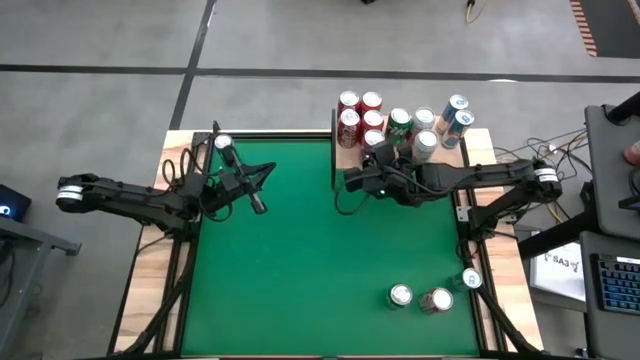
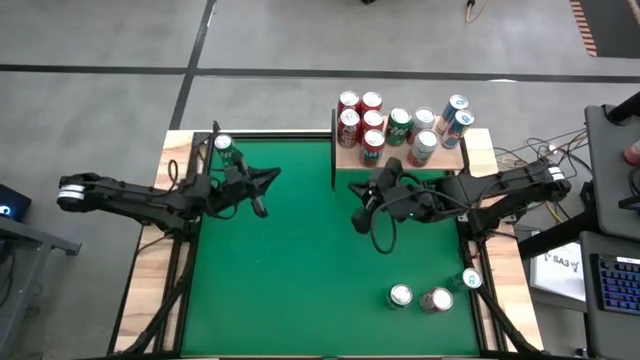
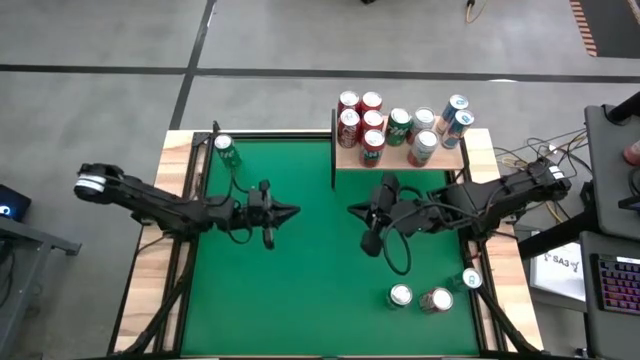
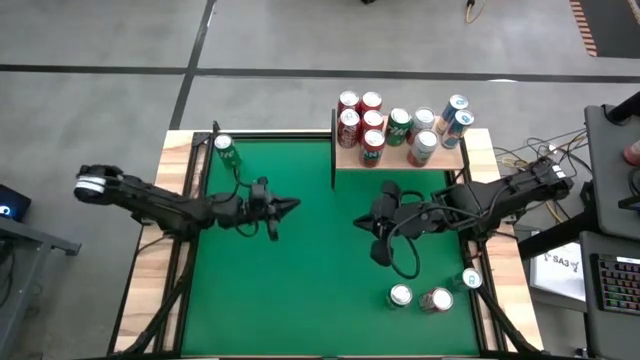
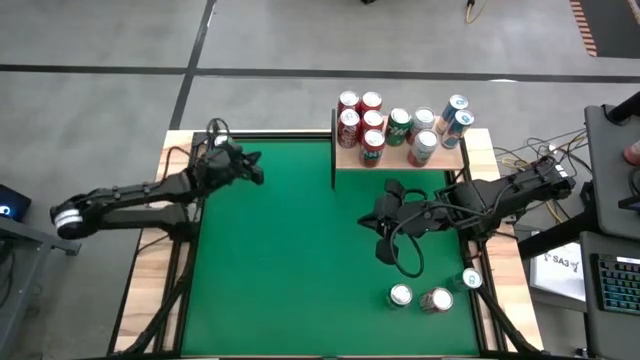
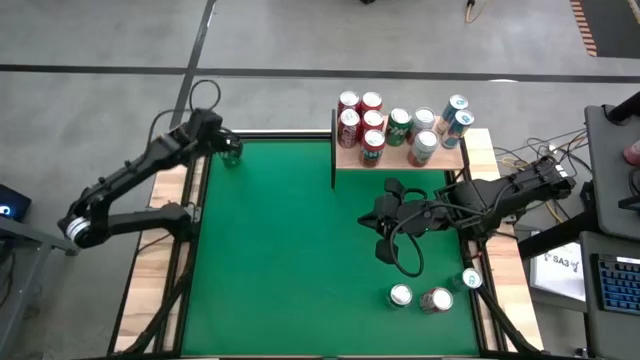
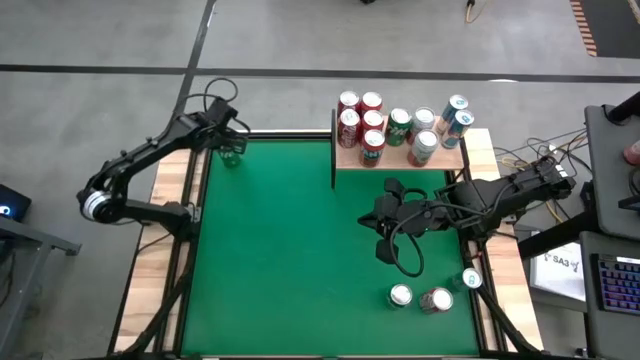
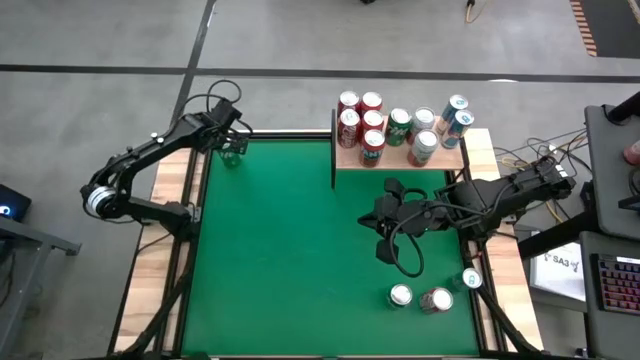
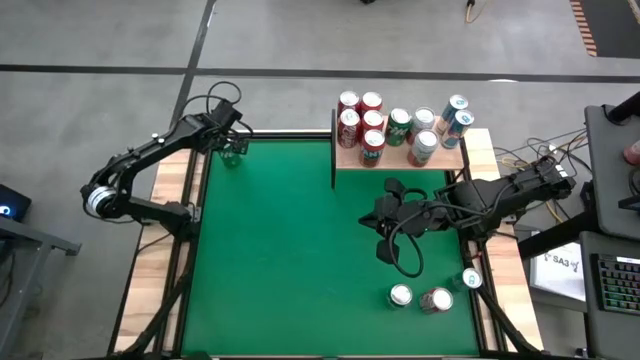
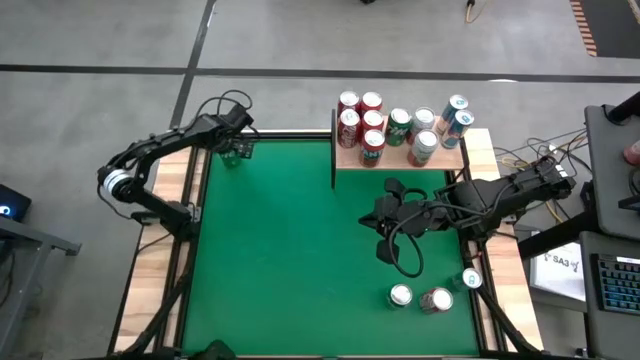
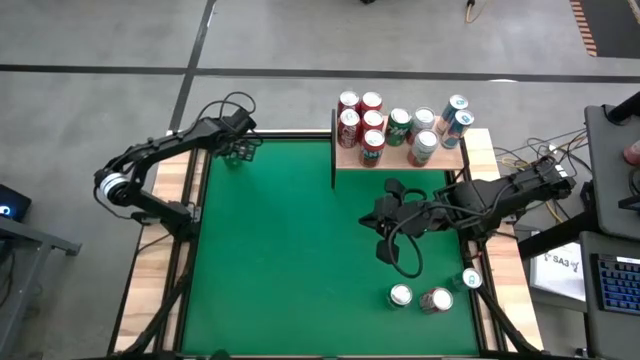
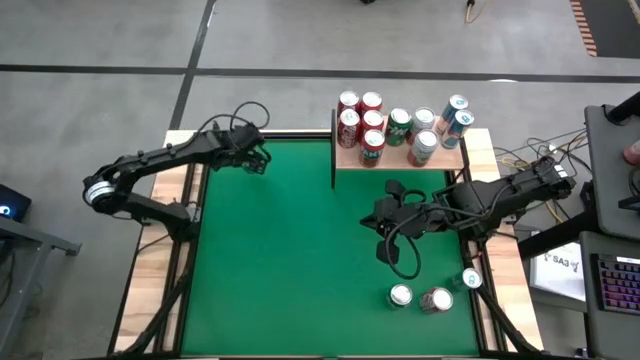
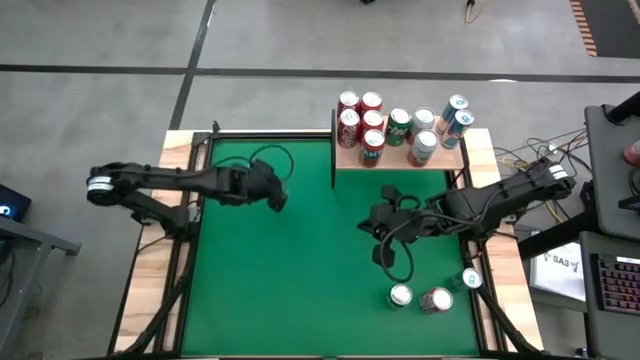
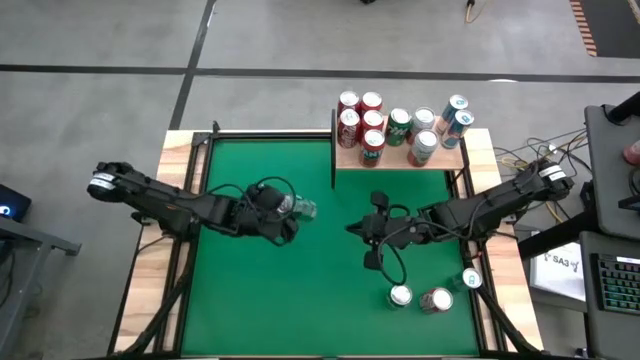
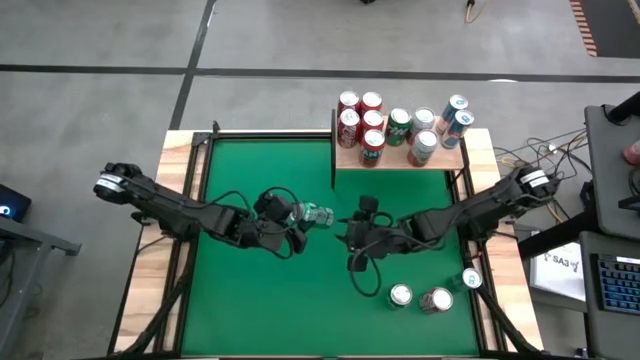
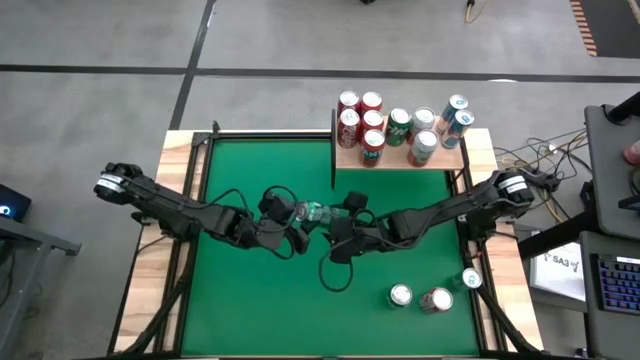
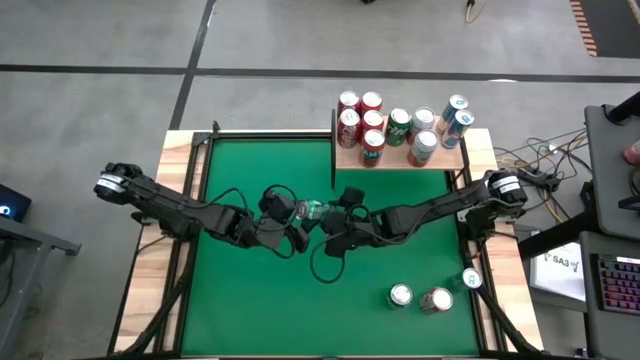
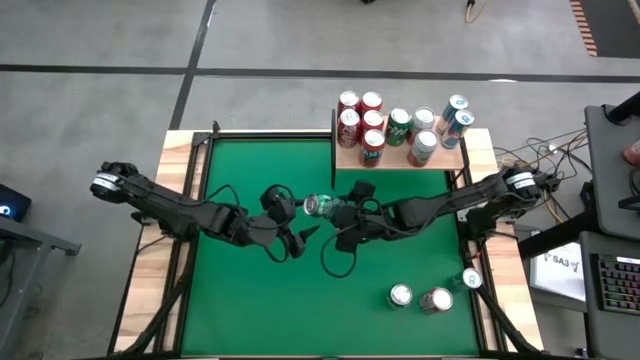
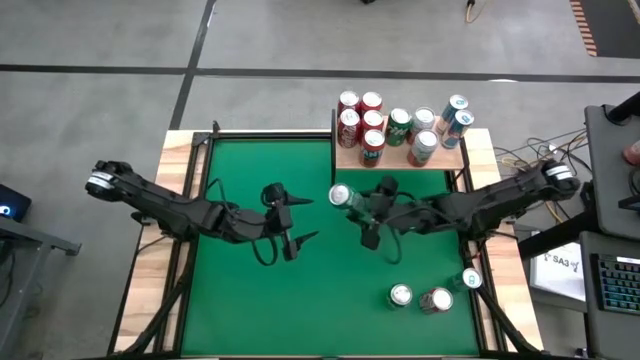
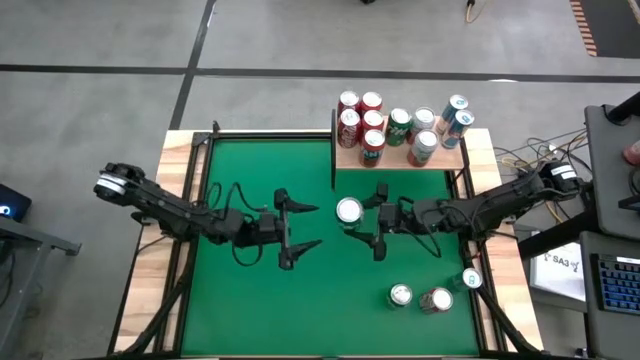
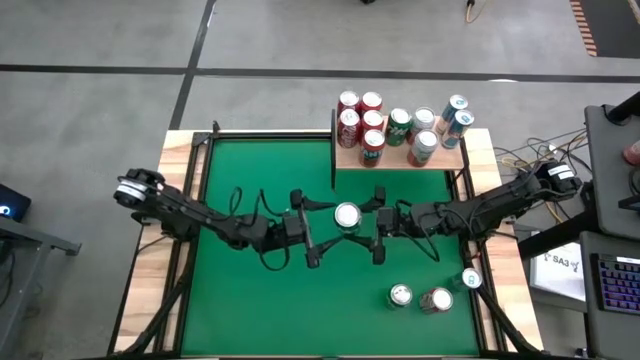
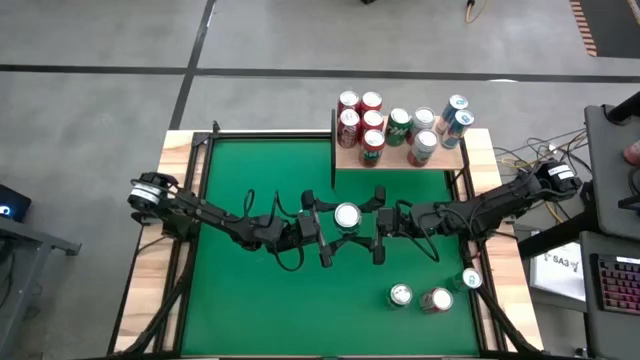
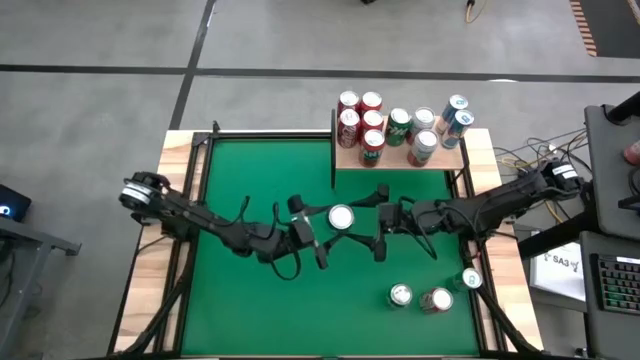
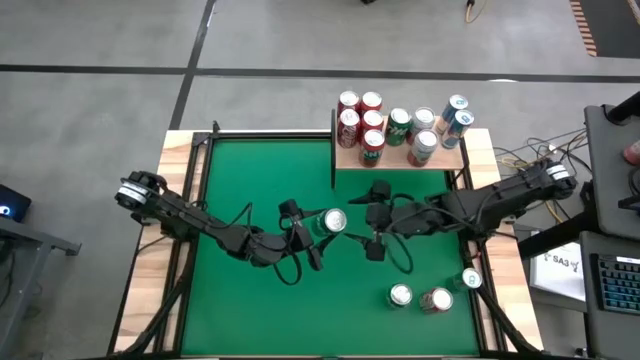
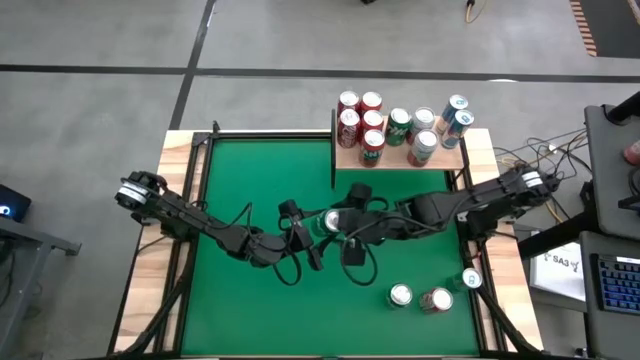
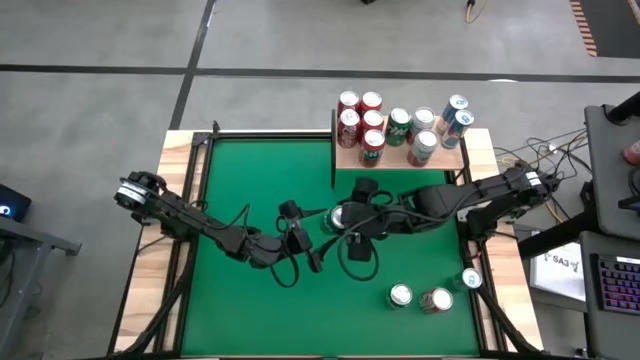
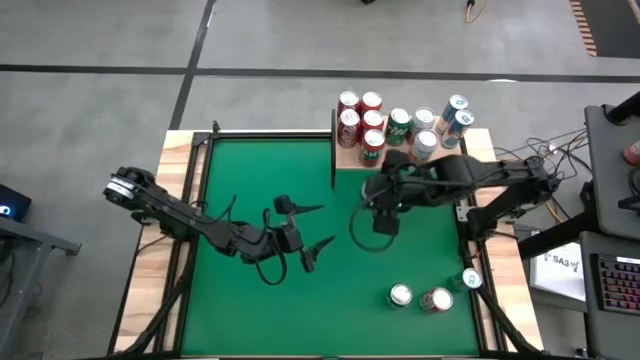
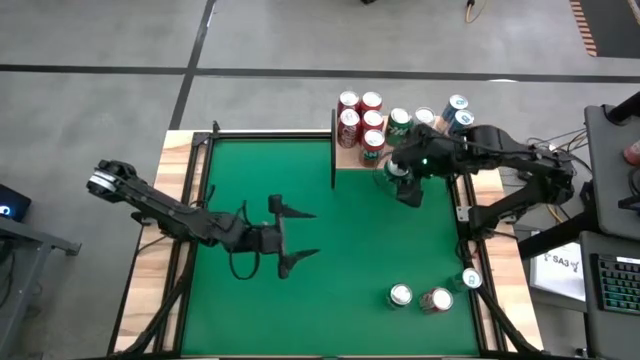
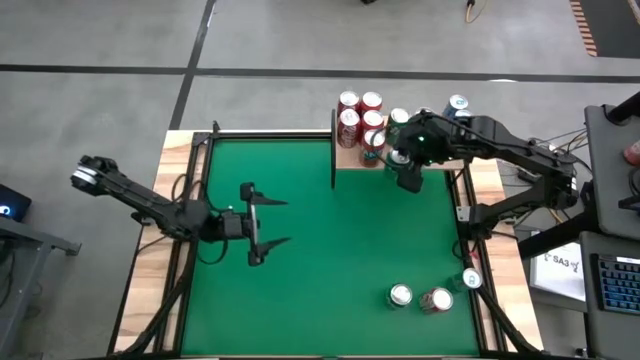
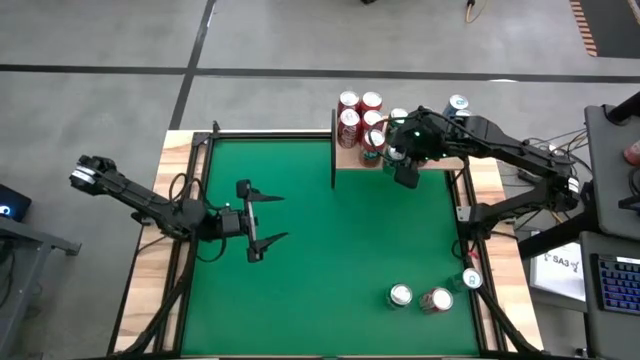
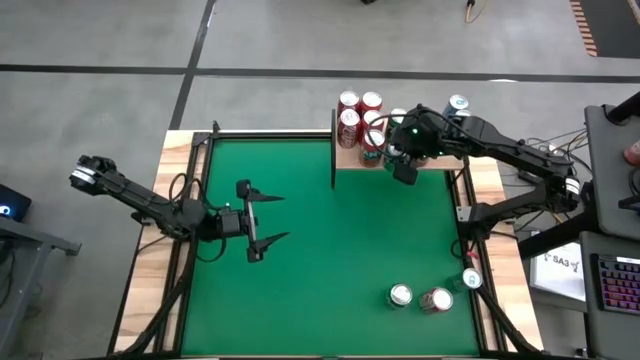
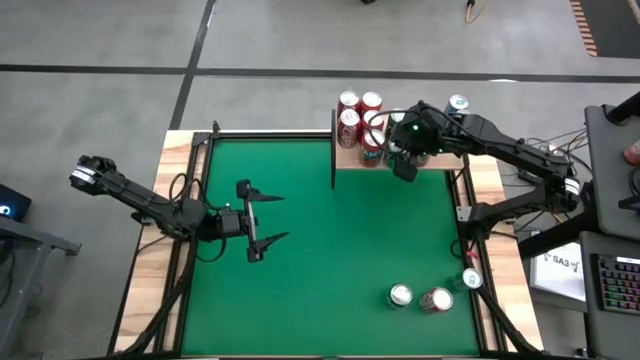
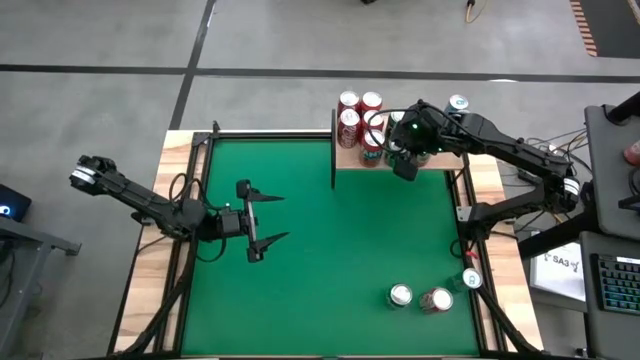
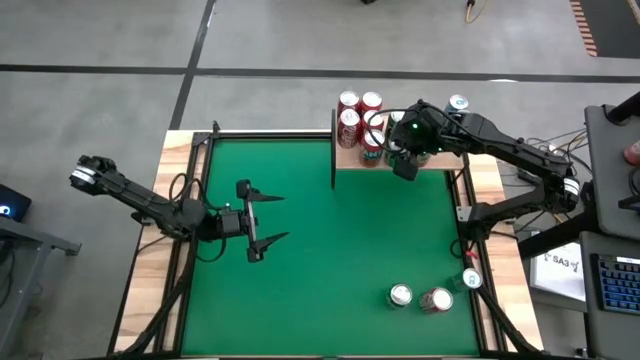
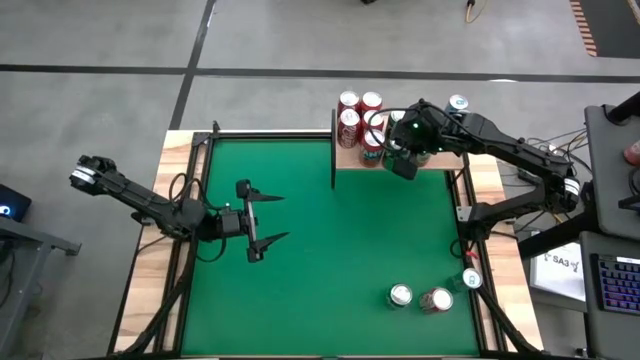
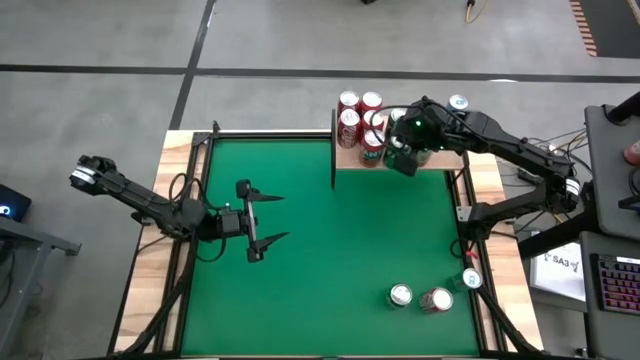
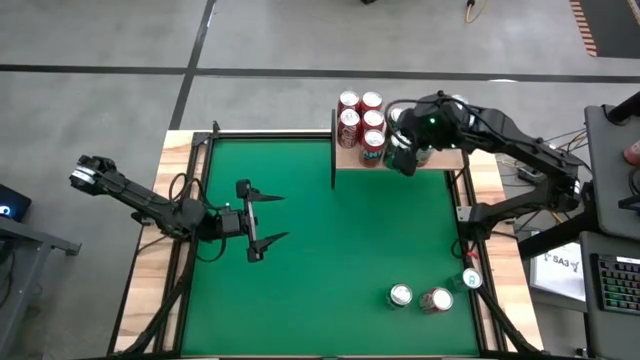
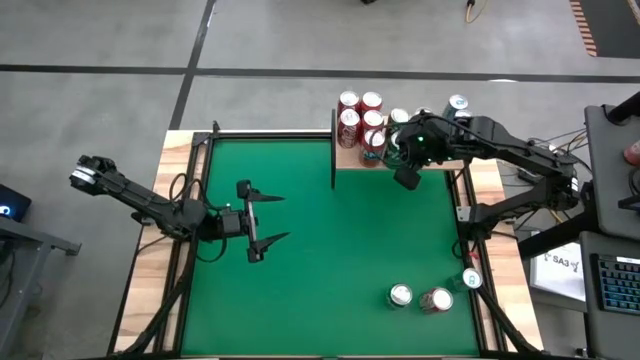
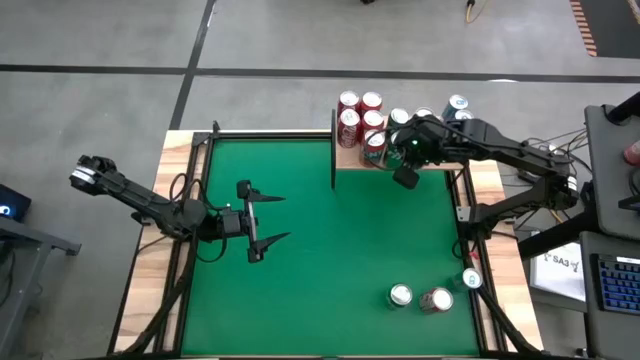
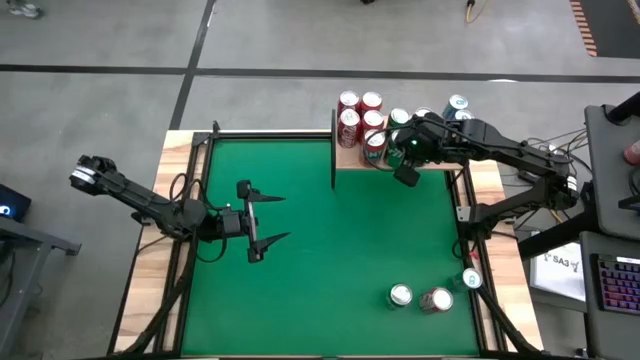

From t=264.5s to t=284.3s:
Task: Place canned beverage on shelf
Put the top green soda can on the shelf aligned with the other green soda can

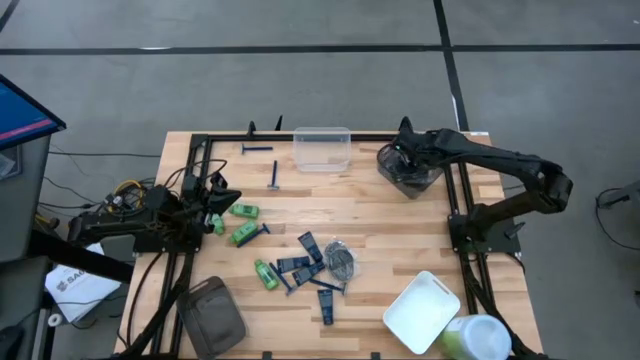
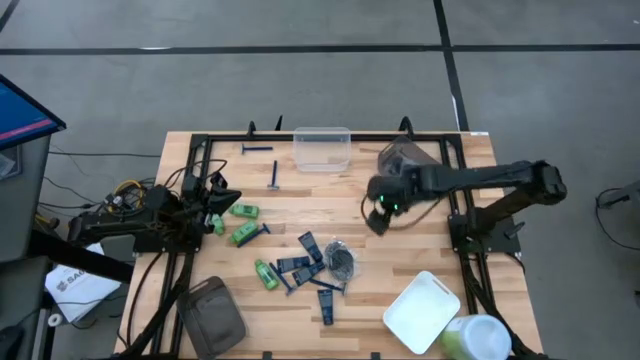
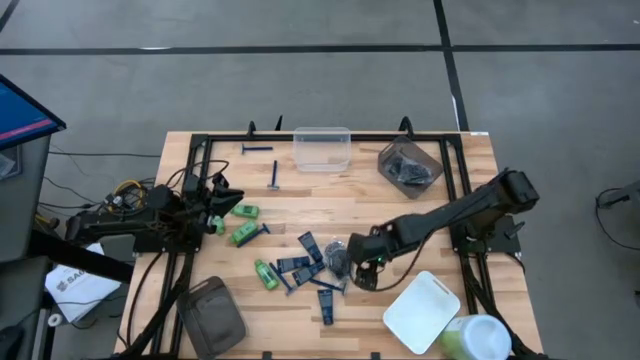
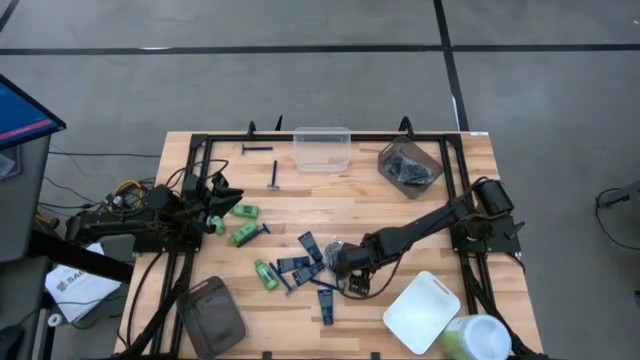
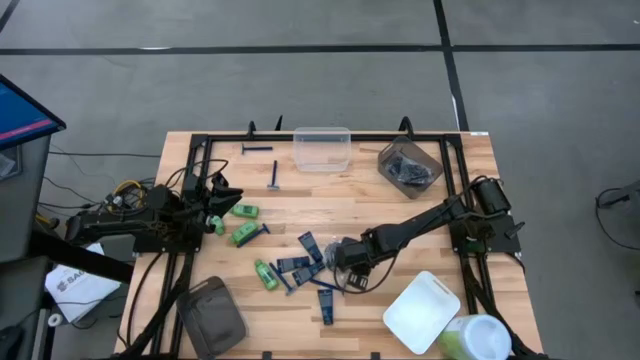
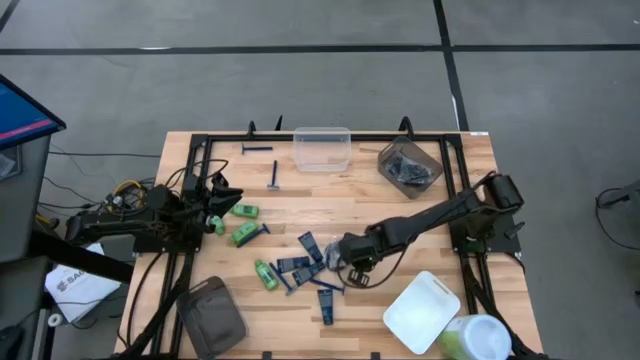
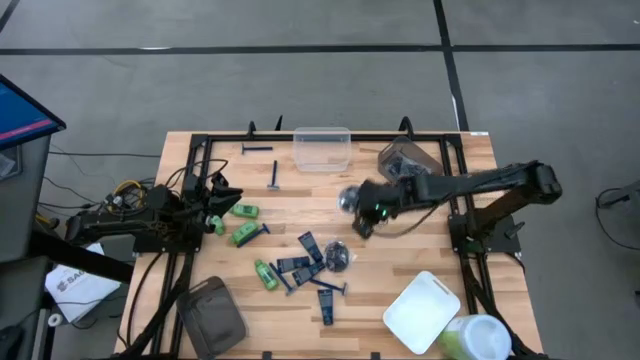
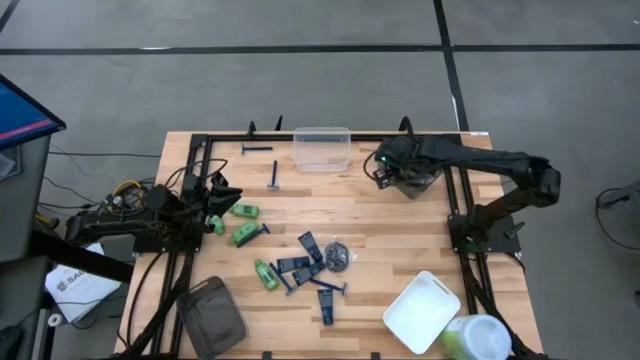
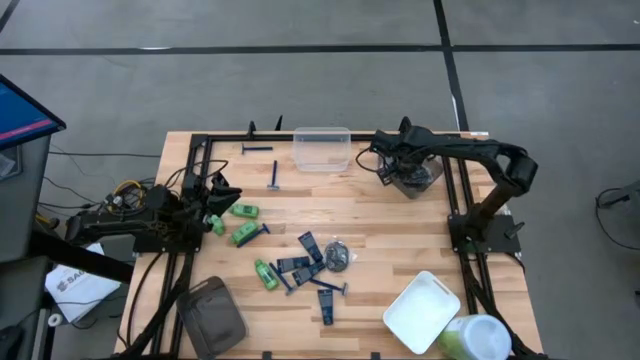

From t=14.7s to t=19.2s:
Task: Pick & Place Travel size toiletries
Put the black hairbrush into the top black bin
